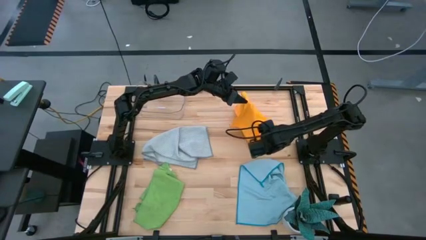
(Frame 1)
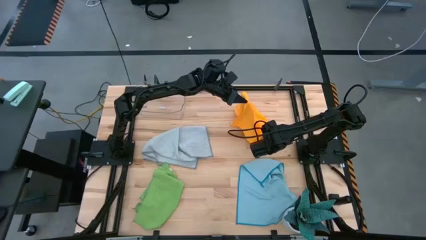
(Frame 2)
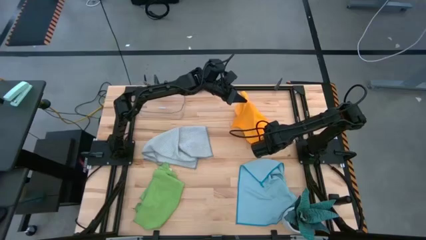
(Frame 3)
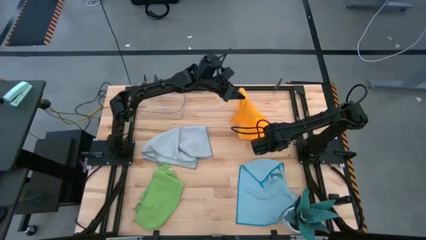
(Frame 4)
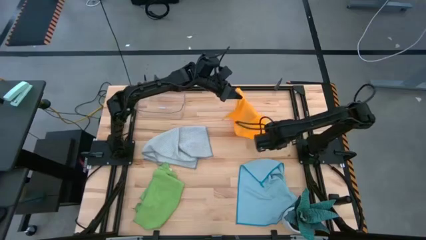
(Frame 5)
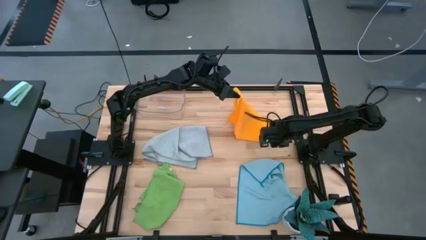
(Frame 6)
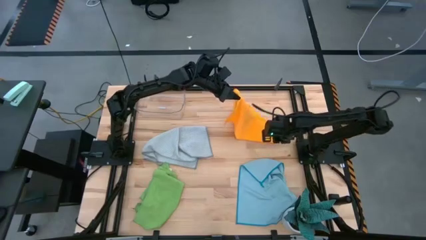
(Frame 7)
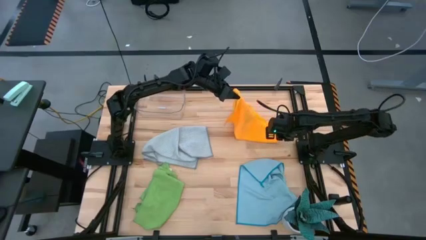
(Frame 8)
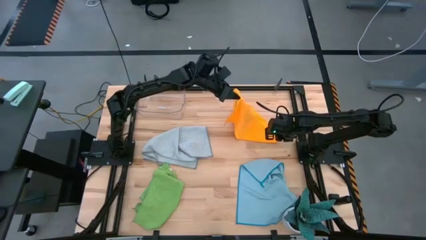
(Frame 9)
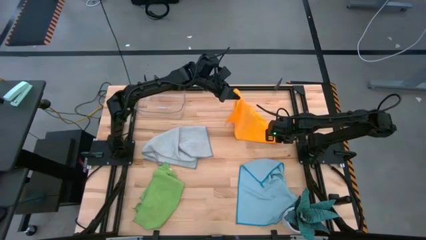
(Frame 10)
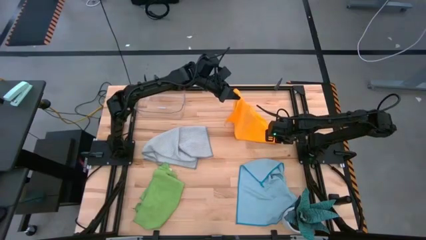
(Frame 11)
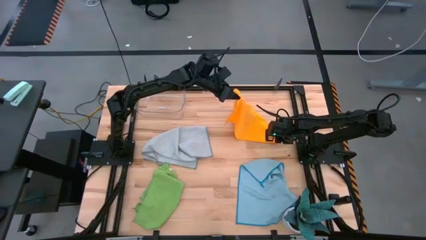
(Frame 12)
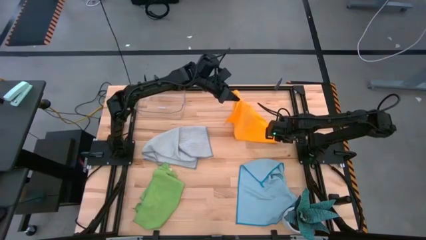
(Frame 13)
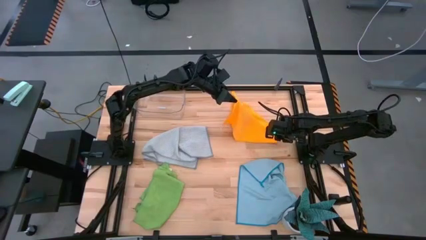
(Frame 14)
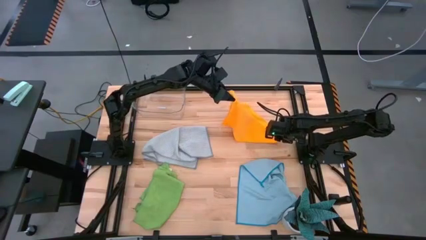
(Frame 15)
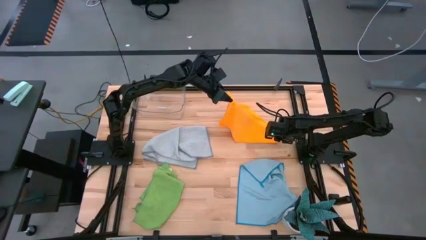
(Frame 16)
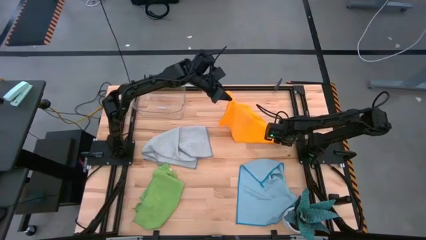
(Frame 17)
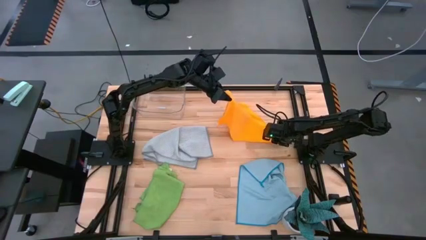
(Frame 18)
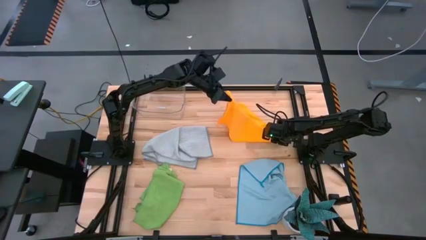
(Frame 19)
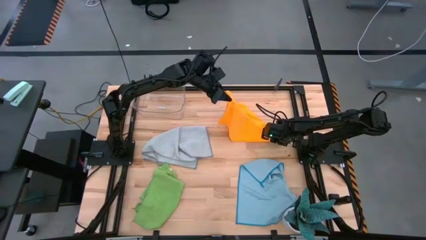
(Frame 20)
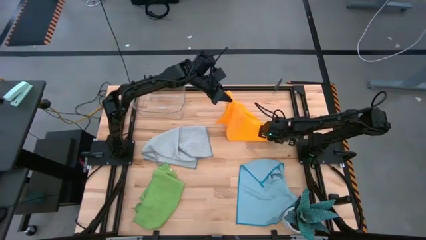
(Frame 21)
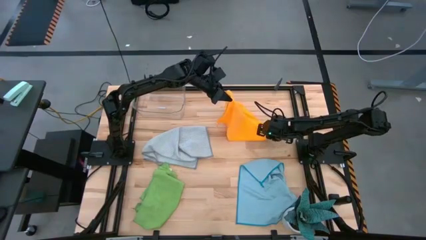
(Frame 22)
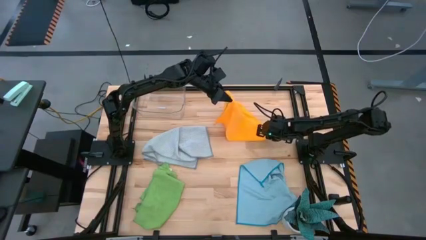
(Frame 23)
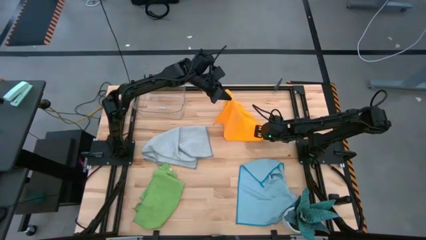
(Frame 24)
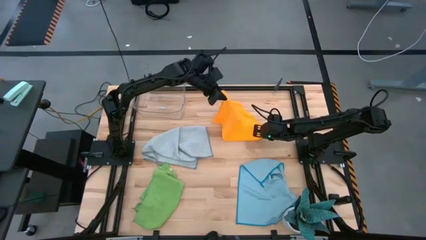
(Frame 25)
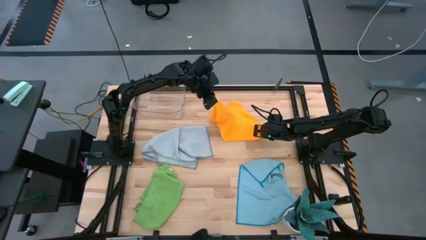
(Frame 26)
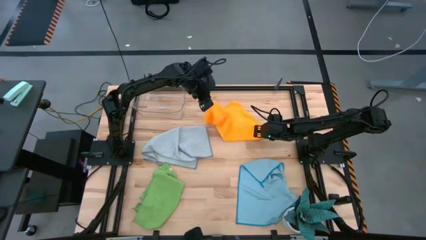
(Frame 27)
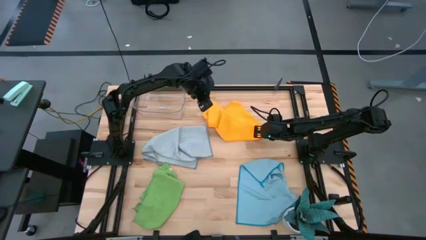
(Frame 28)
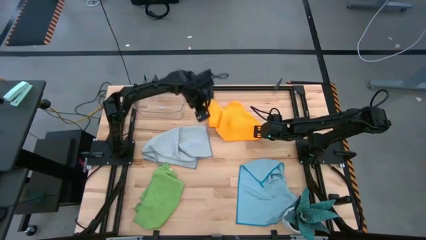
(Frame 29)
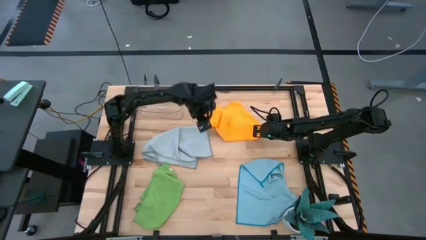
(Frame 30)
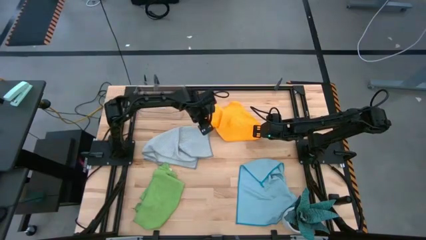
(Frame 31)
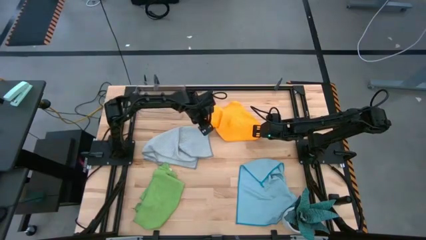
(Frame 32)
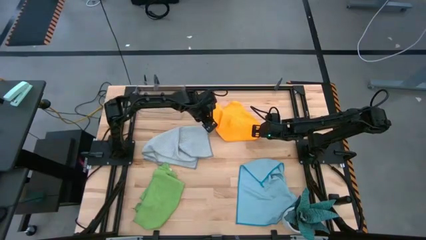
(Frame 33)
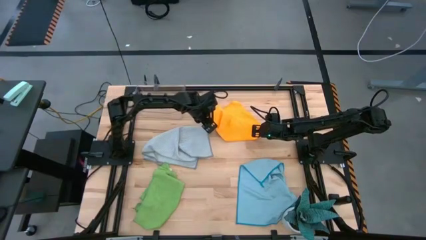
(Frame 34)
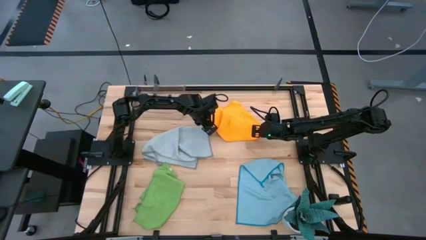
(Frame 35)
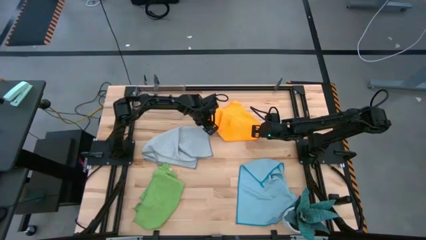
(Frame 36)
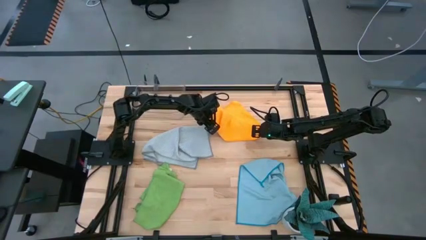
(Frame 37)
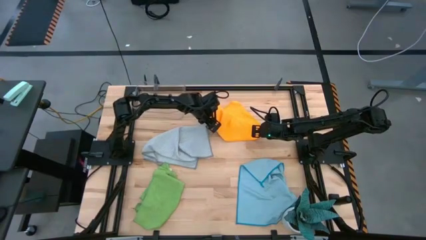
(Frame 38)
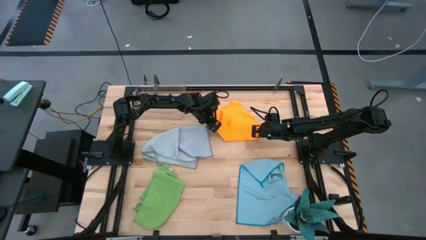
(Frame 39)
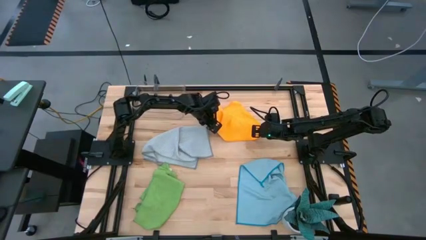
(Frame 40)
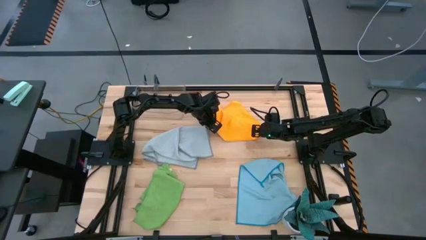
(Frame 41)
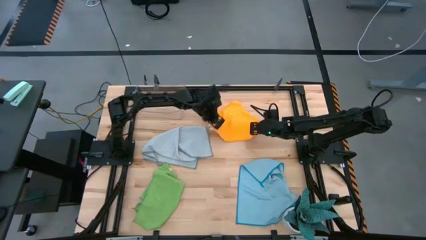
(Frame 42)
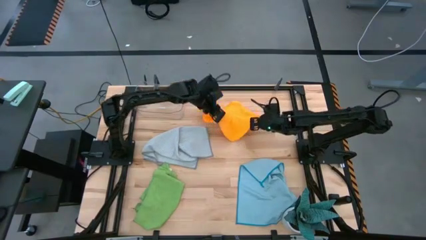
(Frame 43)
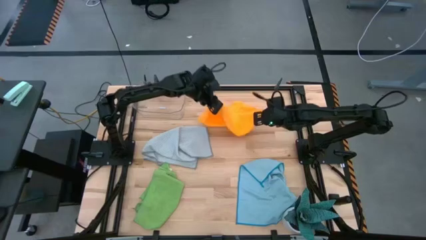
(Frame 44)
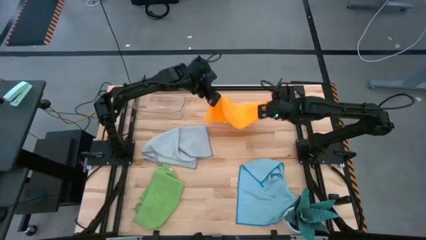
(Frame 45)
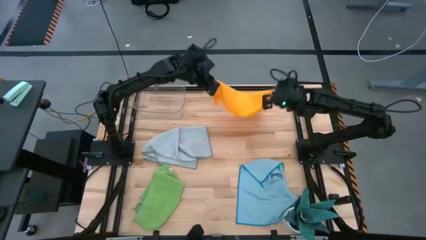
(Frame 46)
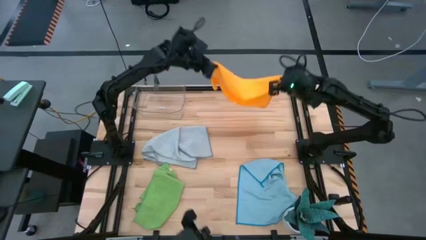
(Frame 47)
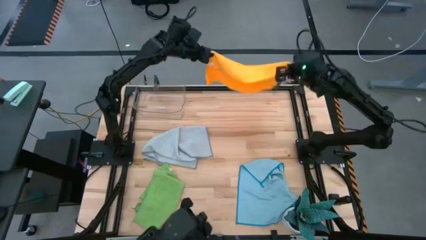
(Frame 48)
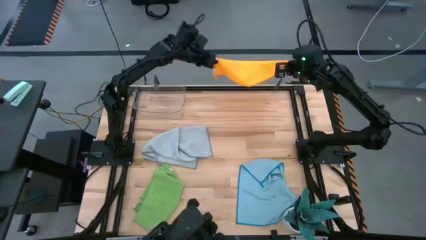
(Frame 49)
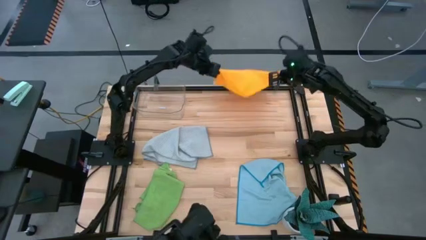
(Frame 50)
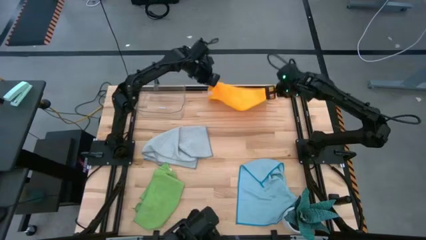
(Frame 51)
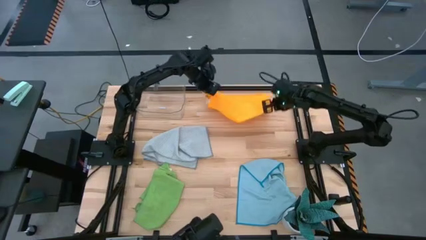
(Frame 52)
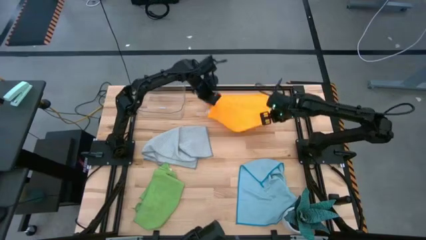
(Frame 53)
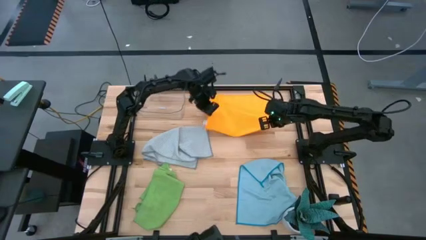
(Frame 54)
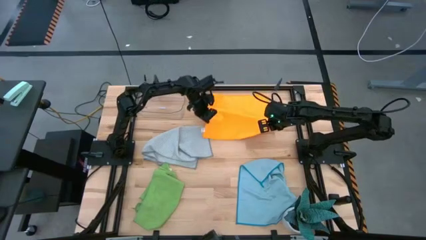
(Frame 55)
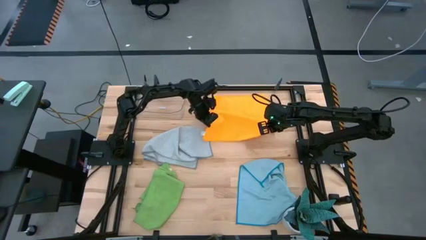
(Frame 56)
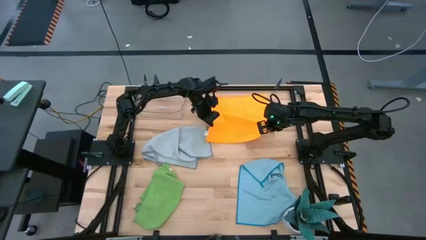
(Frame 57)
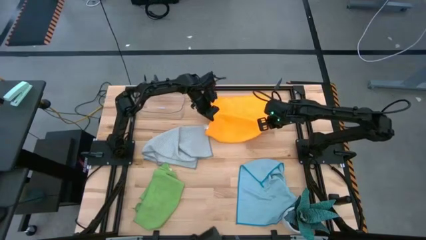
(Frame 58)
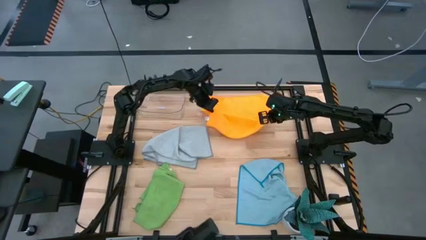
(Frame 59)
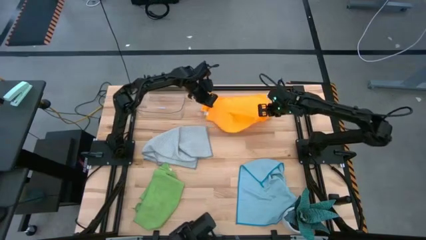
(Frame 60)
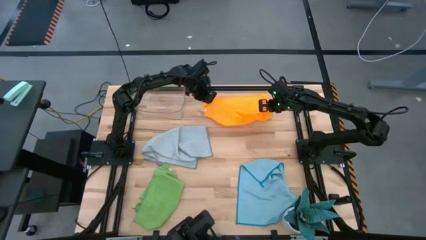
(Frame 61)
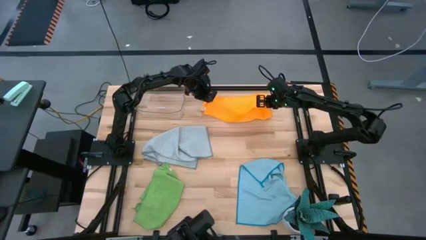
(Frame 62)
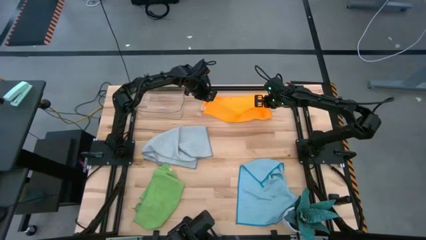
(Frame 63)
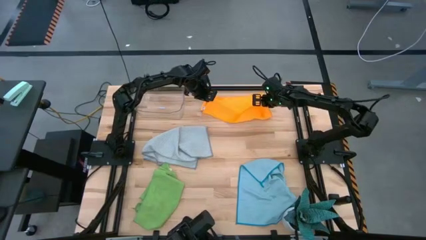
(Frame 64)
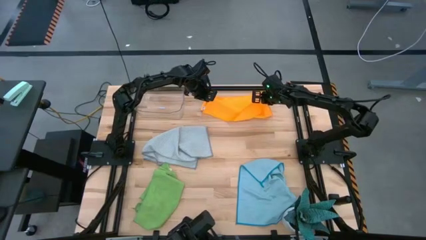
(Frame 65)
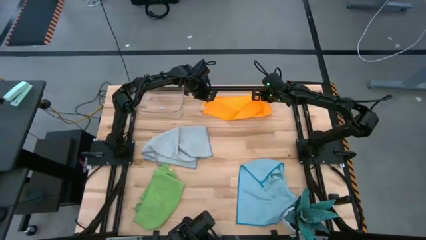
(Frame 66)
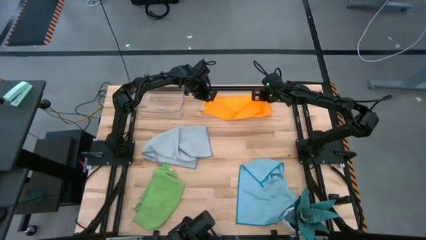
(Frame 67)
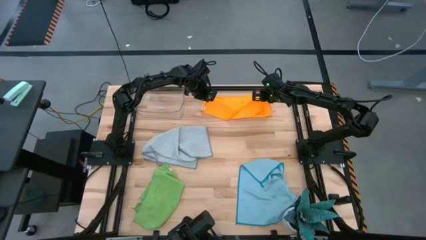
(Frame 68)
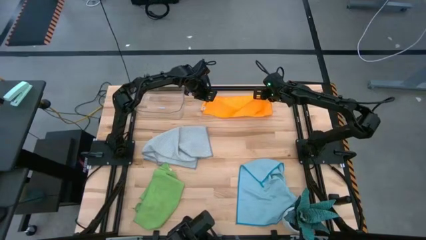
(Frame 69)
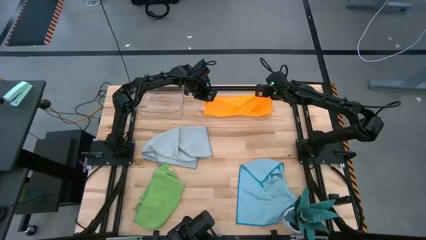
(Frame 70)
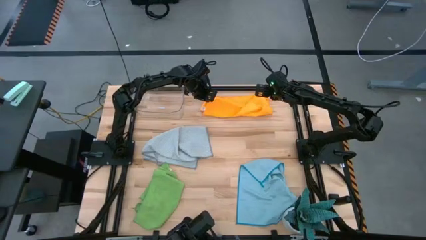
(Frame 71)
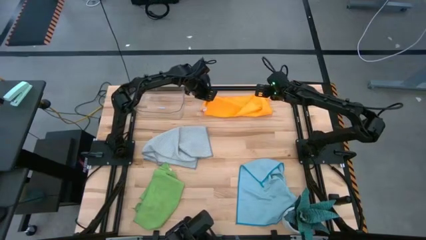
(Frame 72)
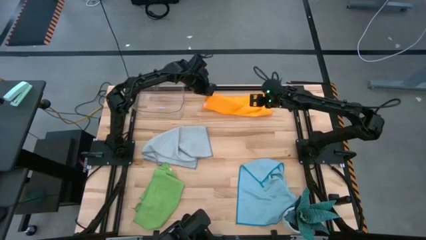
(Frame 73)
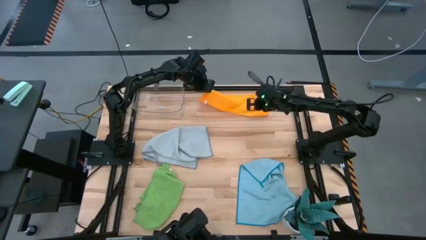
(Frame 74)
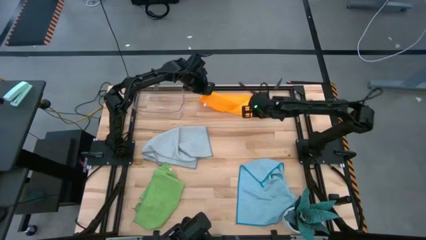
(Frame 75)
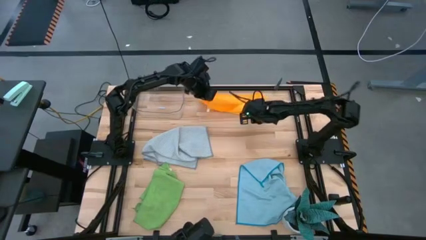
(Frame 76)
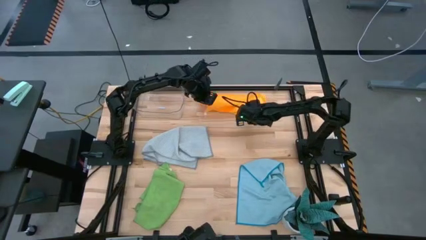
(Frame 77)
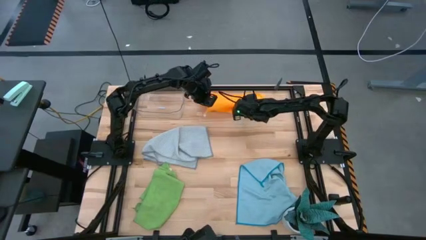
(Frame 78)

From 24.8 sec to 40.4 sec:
Task: Fold microfiber towels
Fold the orange microfiber cloth
